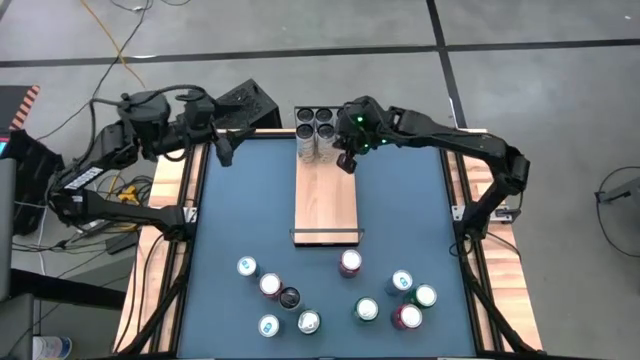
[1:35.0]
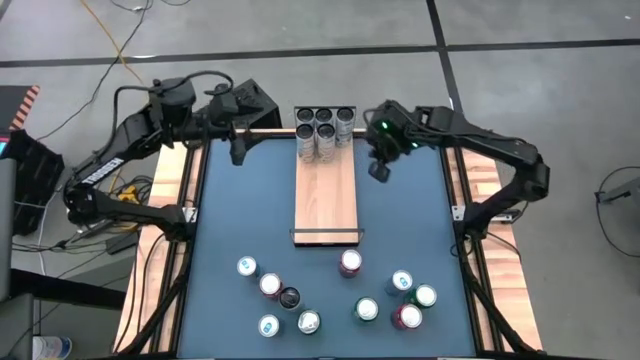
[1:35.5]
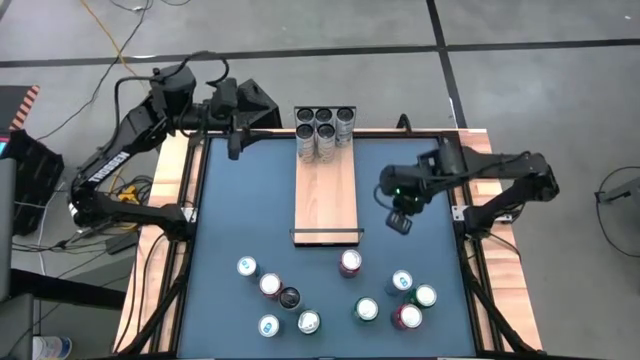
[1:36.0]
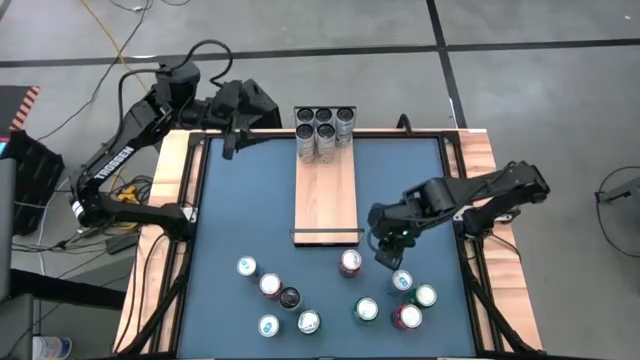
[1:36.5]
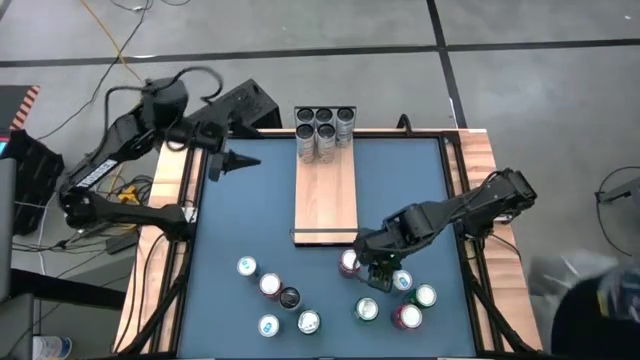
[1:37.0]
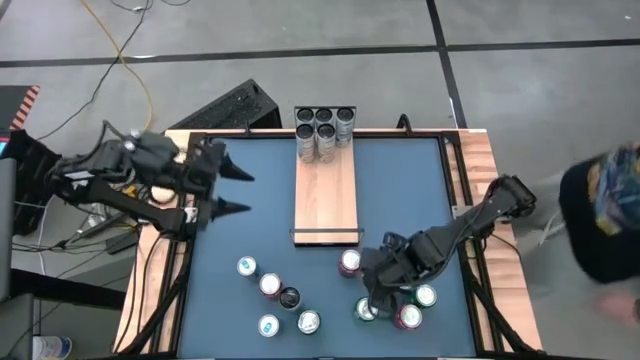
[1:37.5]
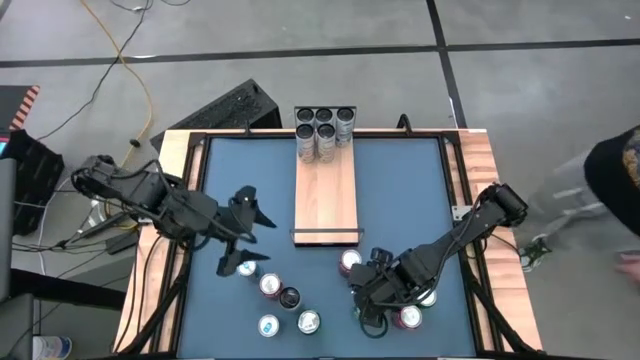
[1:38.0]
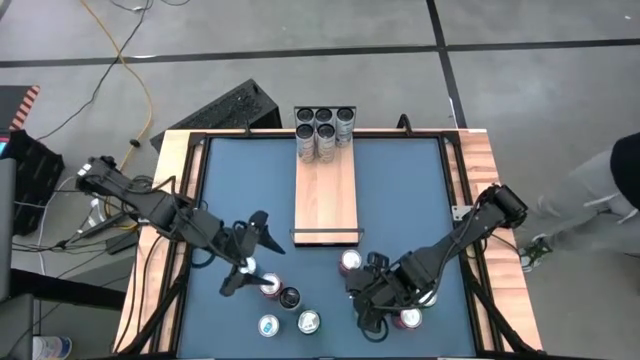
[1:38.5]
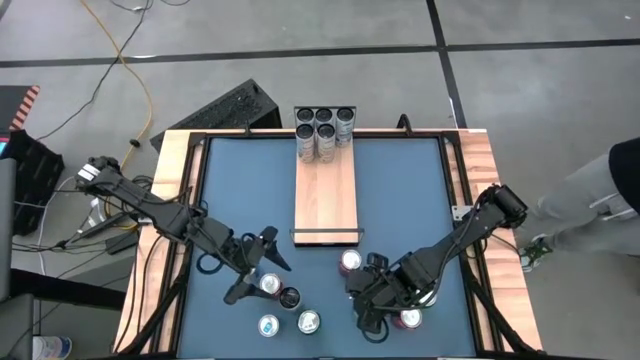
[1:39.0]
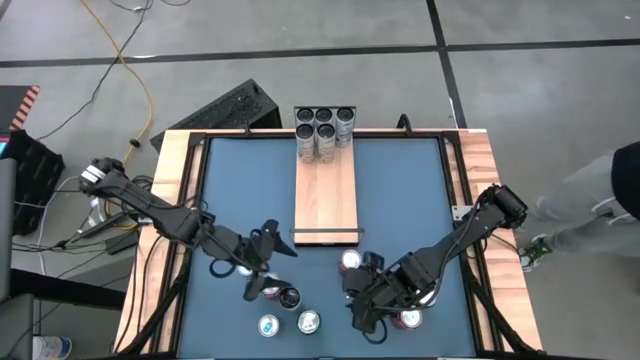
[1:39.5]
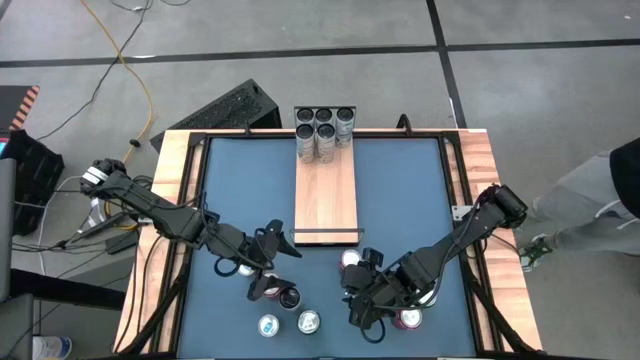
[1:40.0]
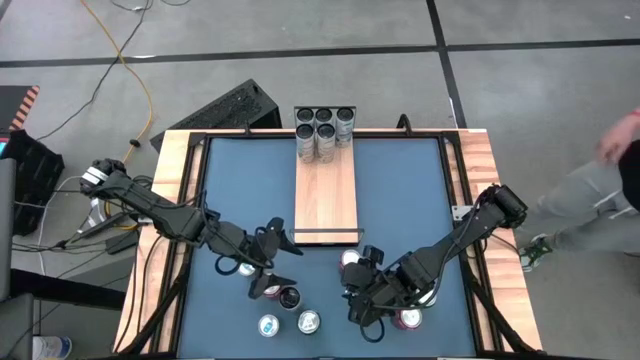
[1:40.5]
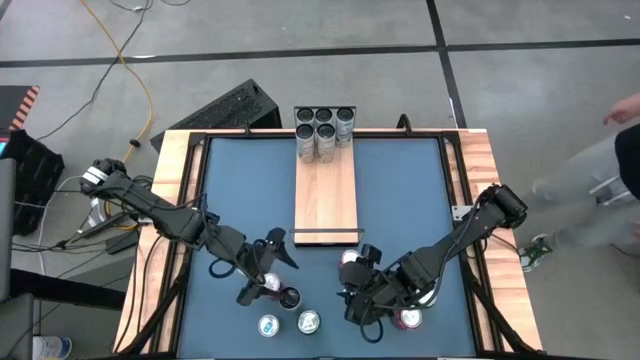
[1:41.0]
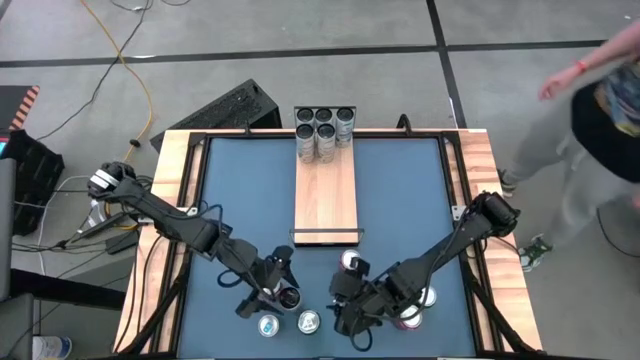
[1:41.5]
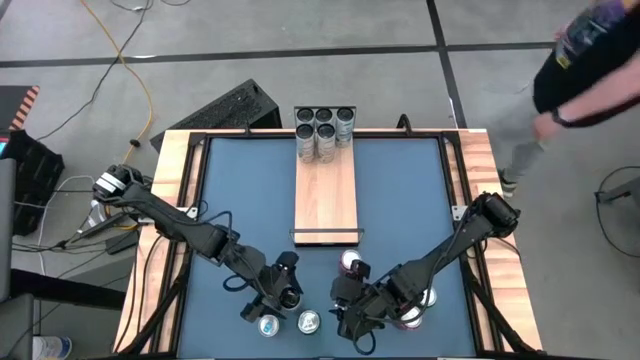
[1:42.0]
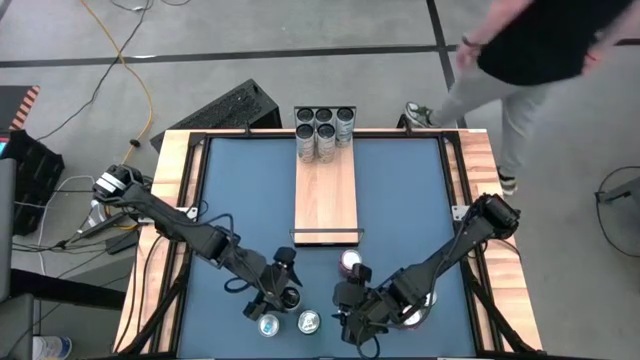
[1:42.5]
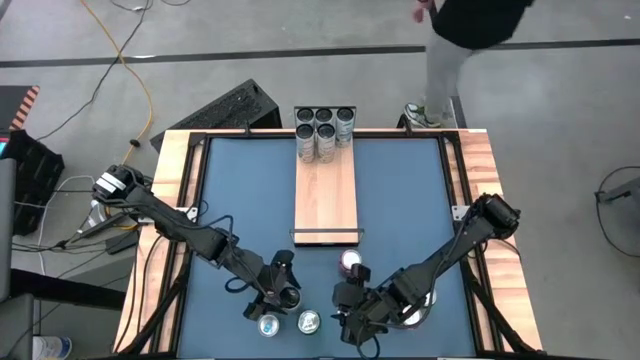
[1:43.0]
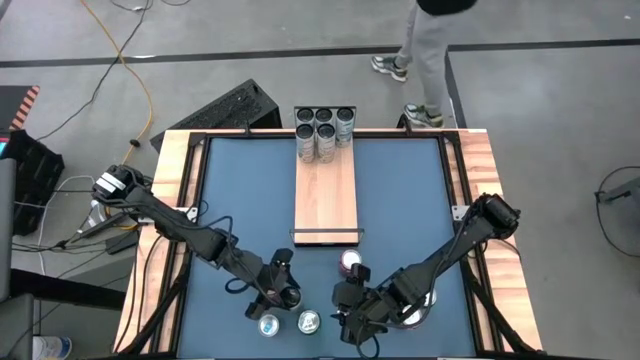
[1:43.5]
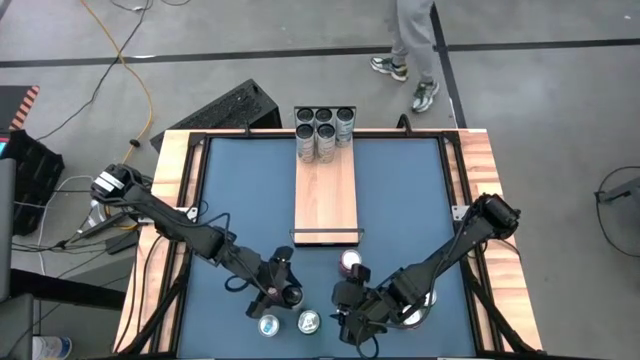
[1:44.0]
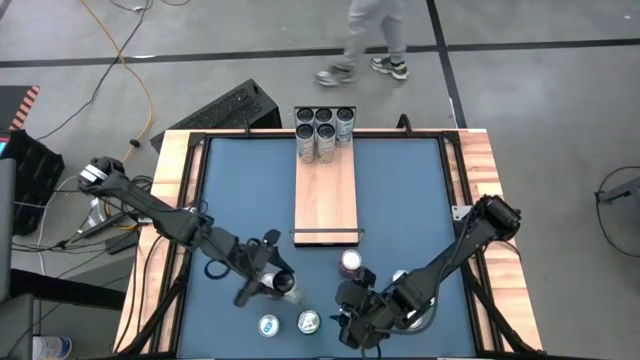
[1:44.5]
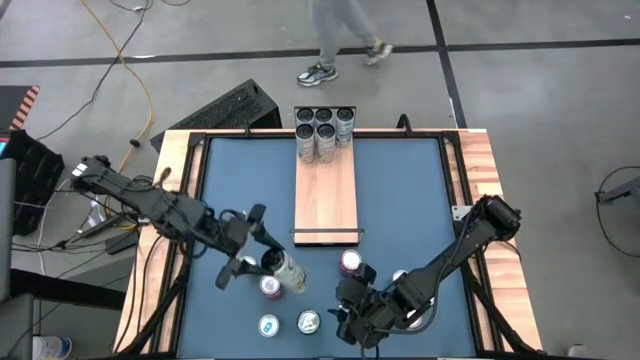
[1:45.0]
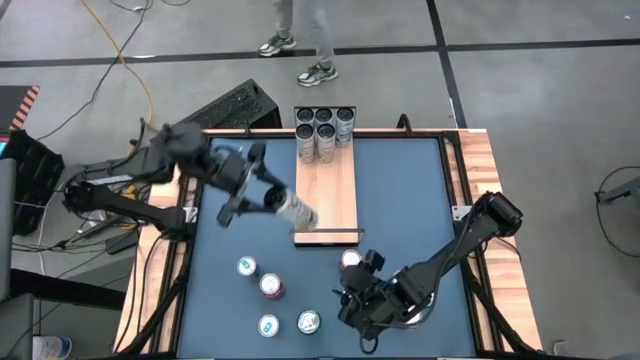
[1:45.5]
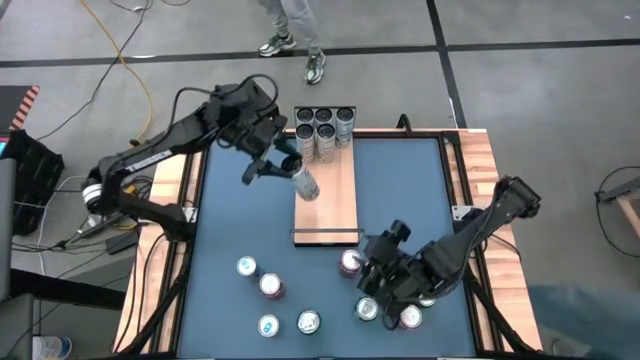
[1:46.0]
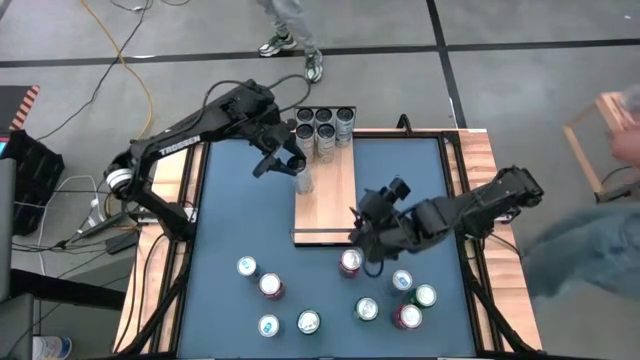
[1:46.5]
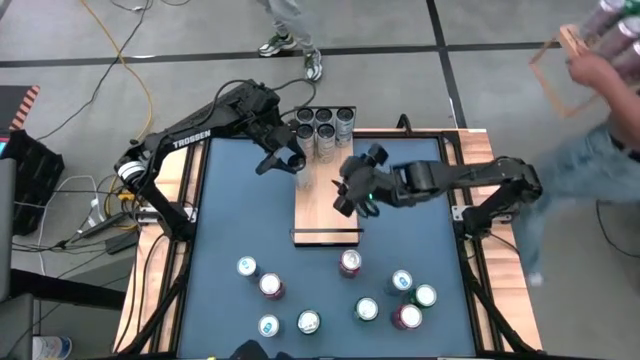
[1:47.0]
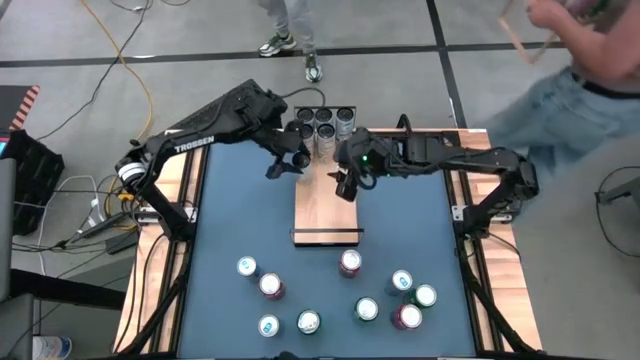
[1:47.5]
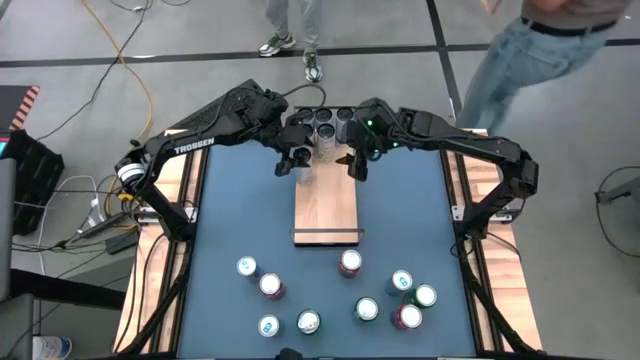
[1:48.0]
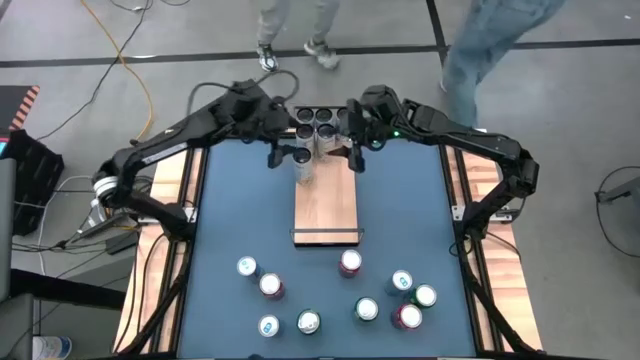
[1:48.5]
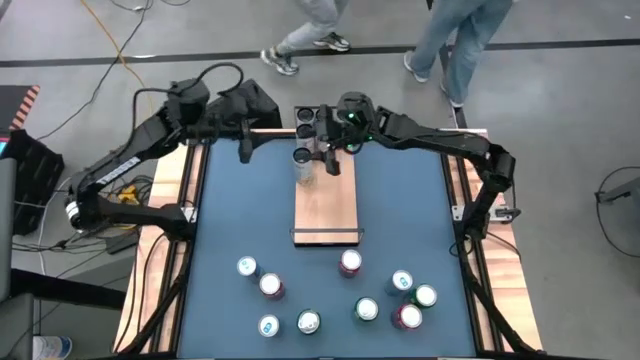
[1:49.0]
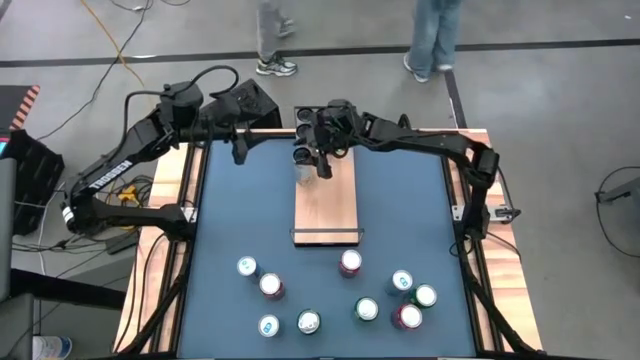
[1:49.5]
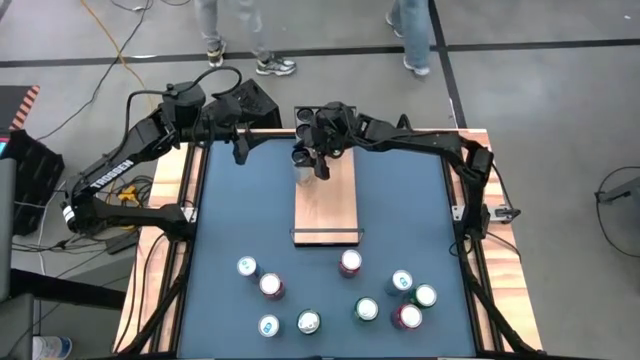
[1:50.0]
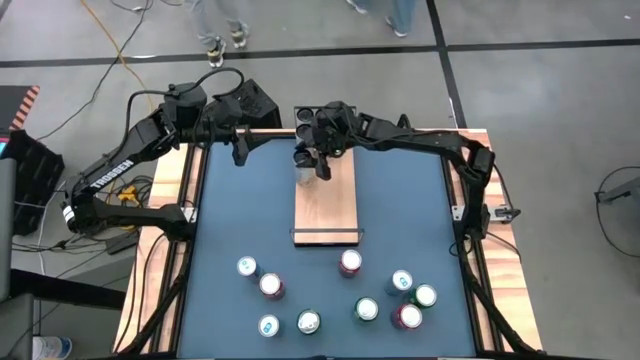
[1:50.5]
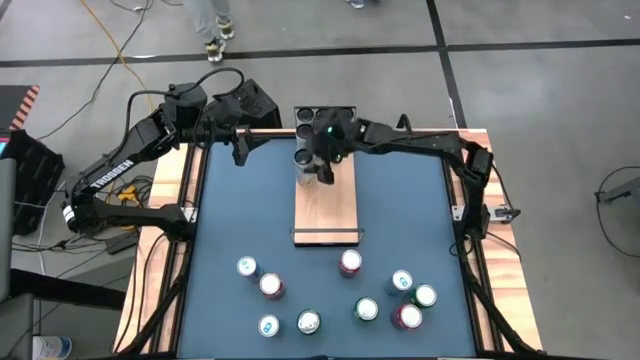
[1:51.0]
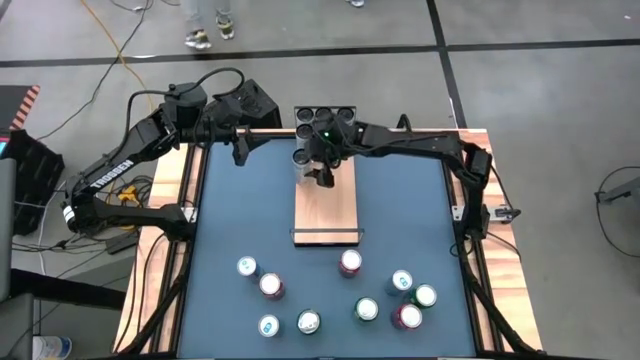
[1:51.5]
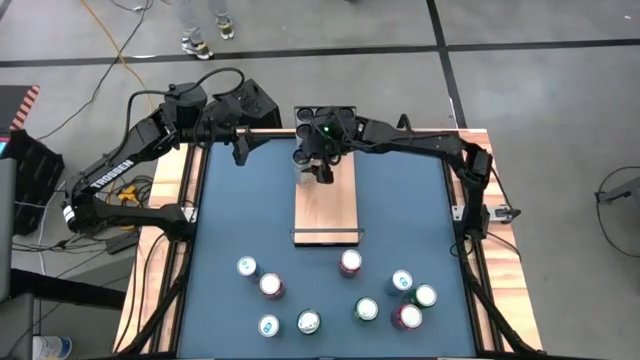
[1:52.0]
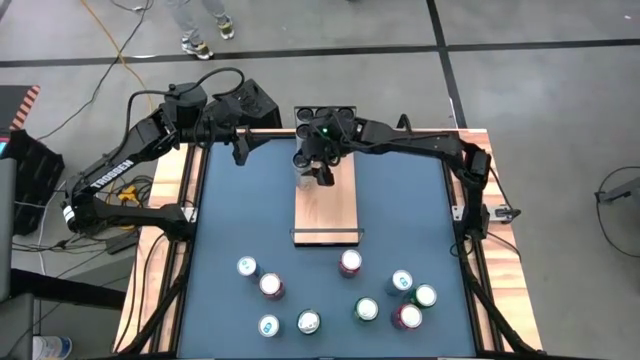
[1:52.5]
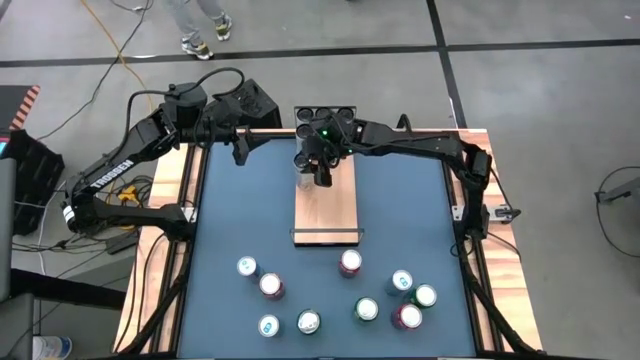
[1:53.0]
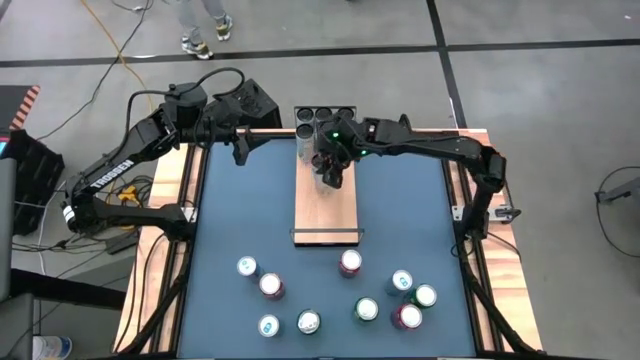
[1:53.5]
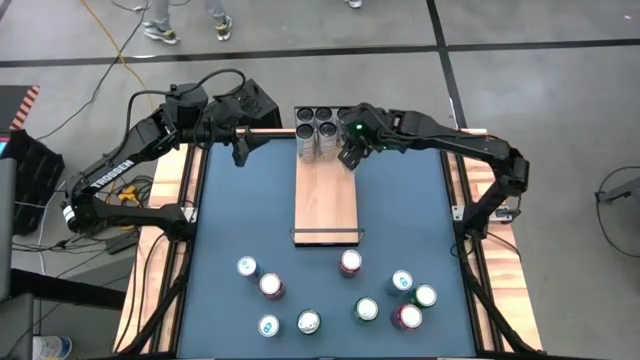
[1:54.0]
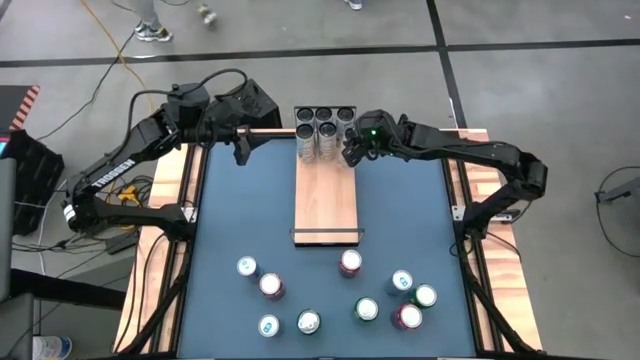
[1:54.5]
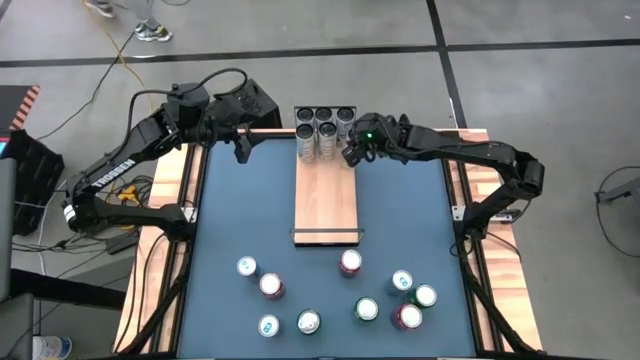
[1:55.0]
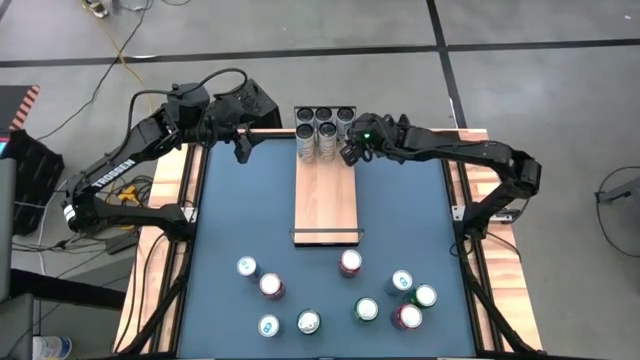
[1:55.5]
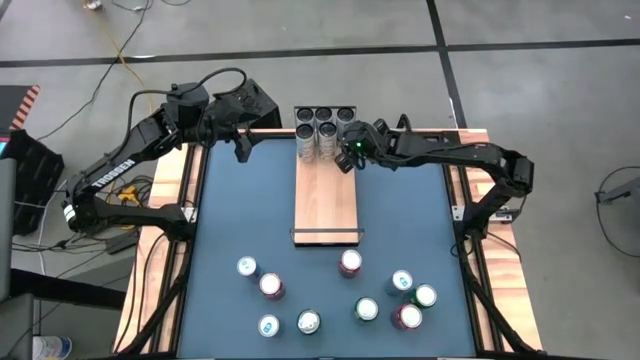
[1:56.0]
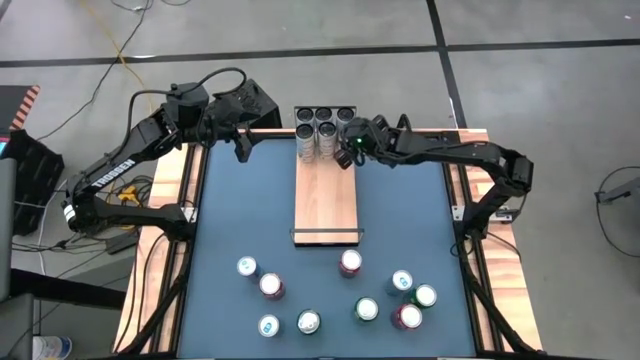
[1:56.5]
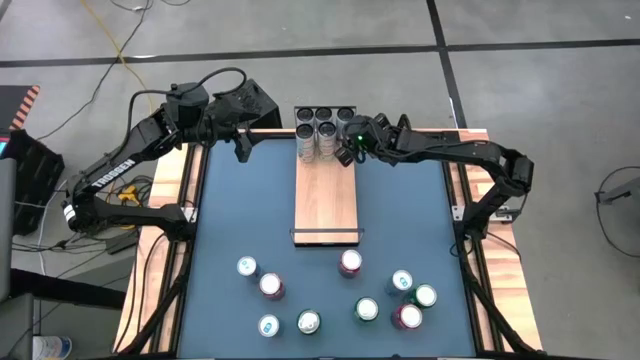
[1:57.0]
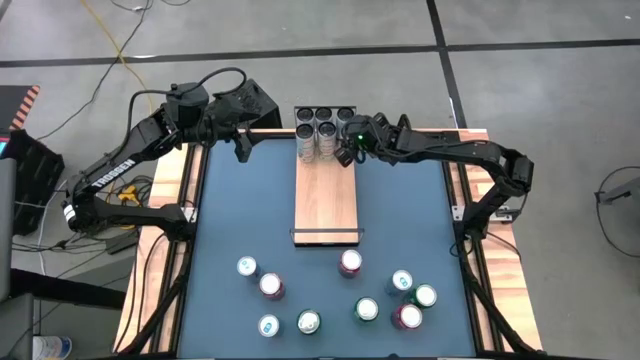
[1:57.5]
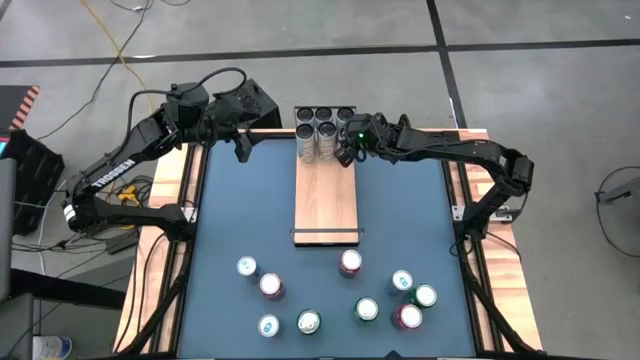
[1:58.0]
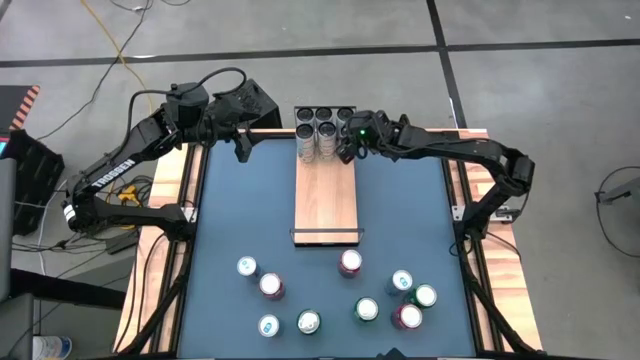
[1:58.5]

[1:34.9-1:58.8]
Task: Place canned beverage on shelf
Put the white yellow soda can on the shelf aligned with the other white yellow soda cans
